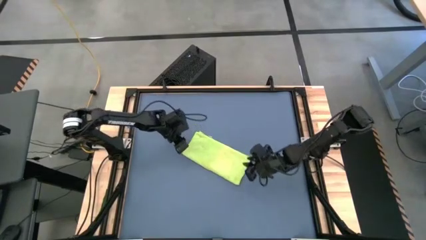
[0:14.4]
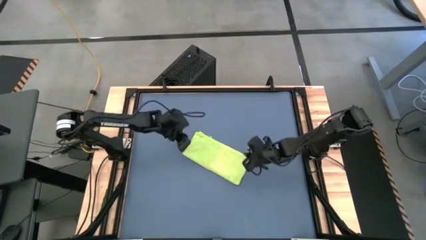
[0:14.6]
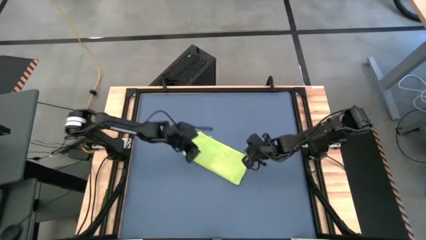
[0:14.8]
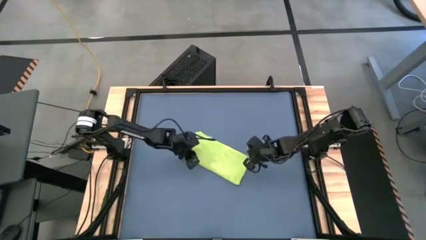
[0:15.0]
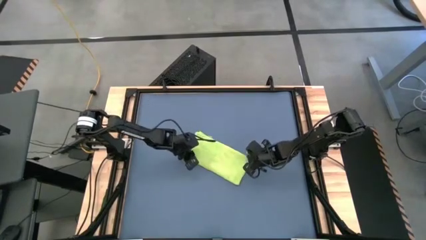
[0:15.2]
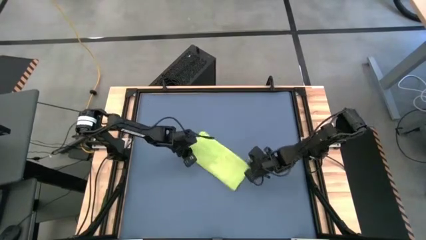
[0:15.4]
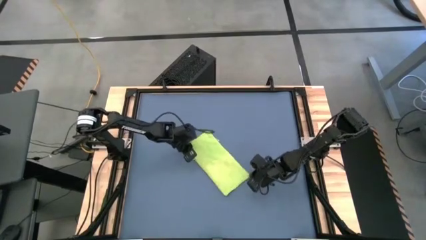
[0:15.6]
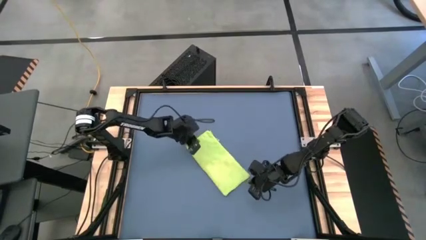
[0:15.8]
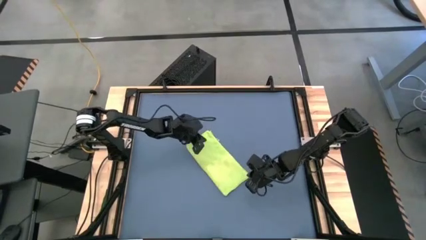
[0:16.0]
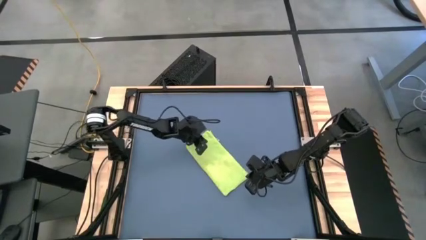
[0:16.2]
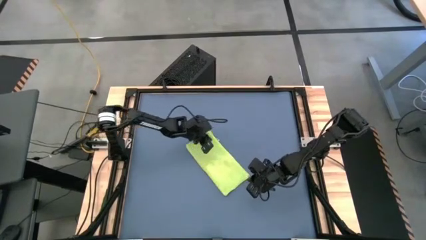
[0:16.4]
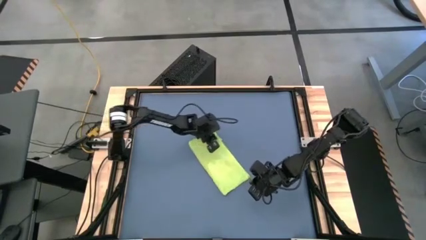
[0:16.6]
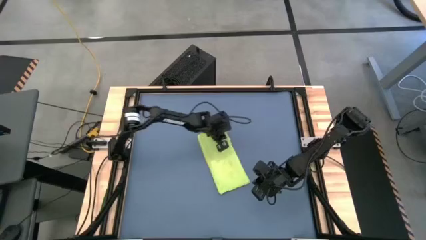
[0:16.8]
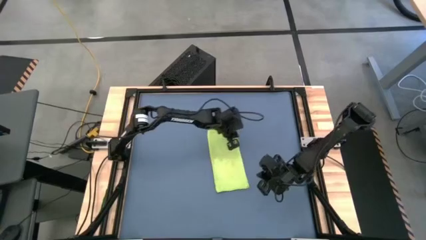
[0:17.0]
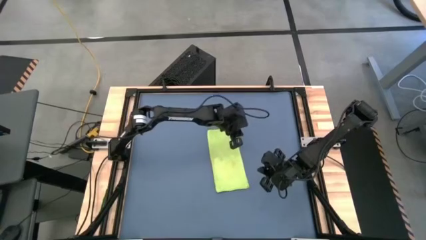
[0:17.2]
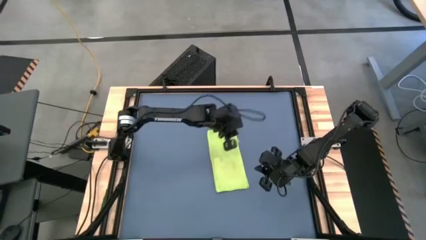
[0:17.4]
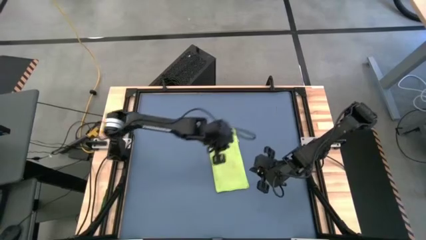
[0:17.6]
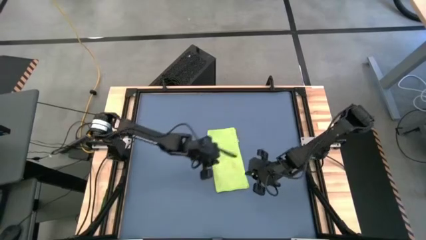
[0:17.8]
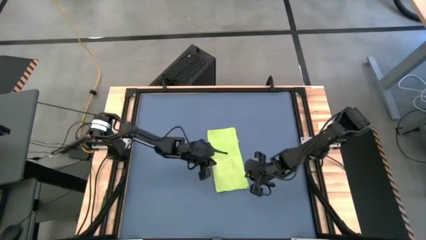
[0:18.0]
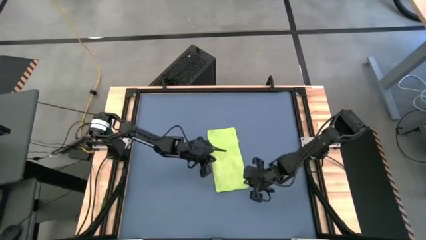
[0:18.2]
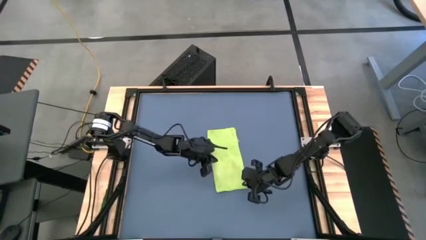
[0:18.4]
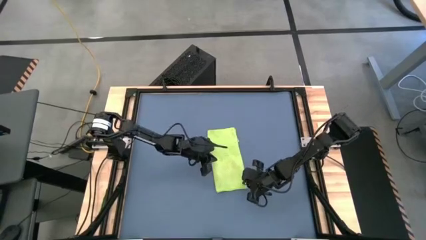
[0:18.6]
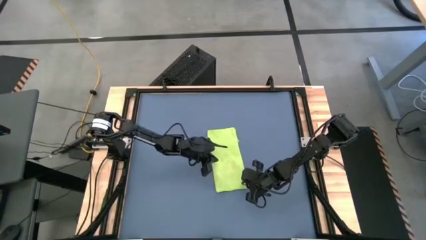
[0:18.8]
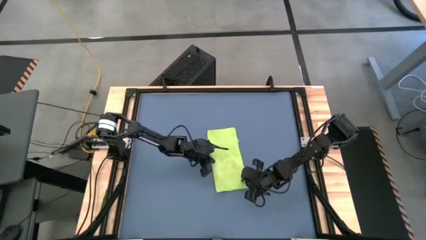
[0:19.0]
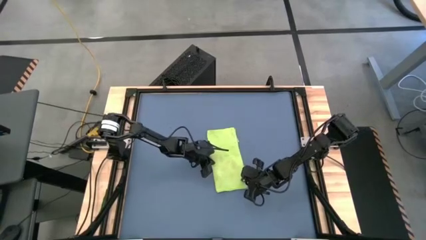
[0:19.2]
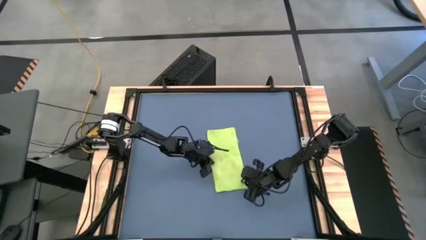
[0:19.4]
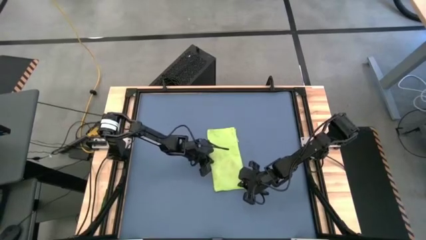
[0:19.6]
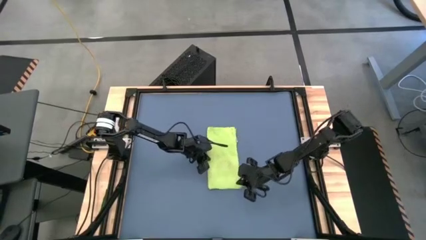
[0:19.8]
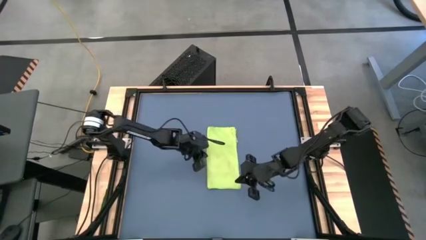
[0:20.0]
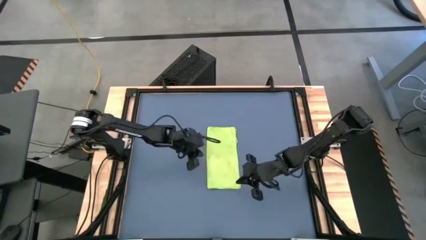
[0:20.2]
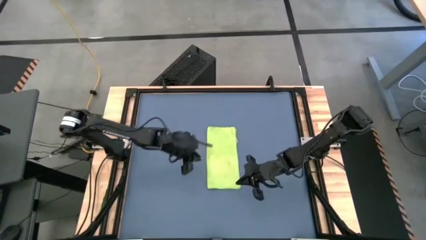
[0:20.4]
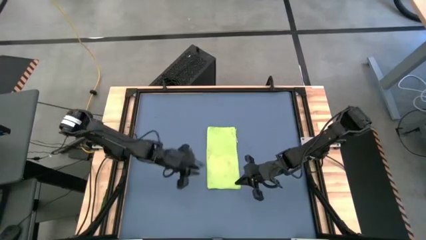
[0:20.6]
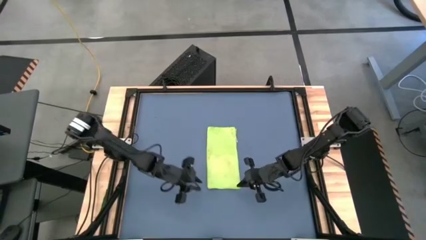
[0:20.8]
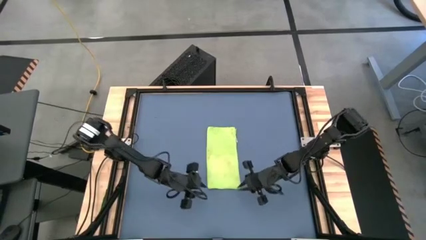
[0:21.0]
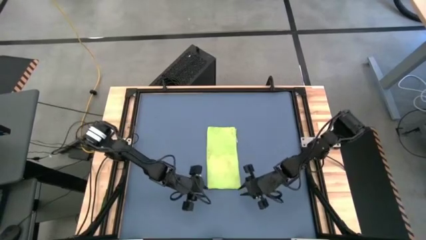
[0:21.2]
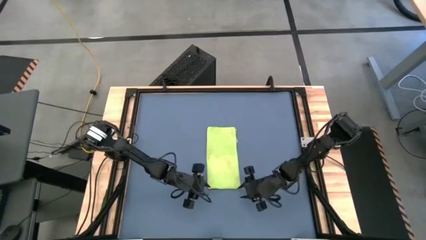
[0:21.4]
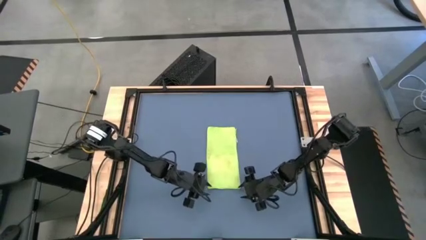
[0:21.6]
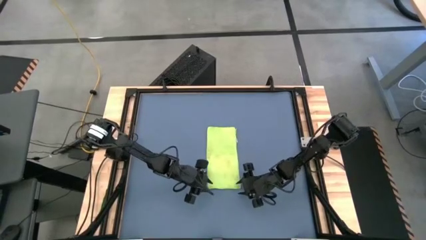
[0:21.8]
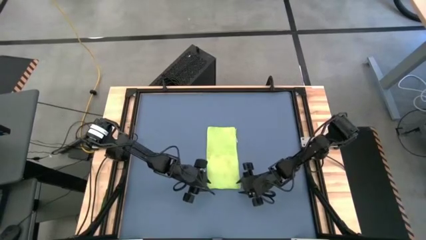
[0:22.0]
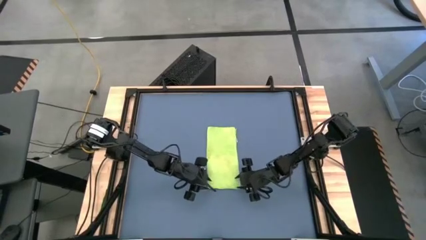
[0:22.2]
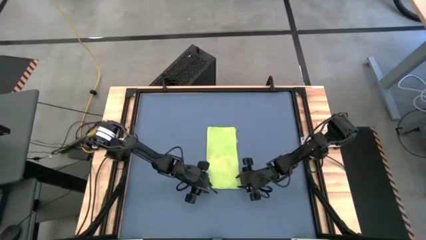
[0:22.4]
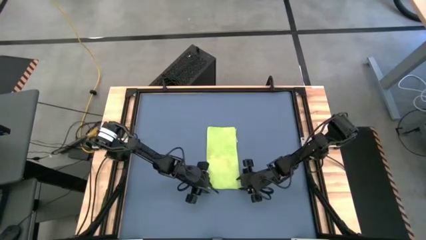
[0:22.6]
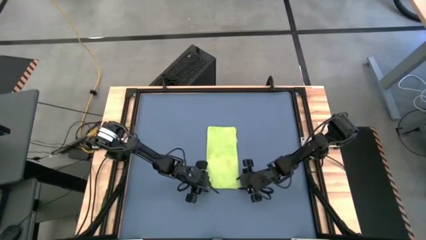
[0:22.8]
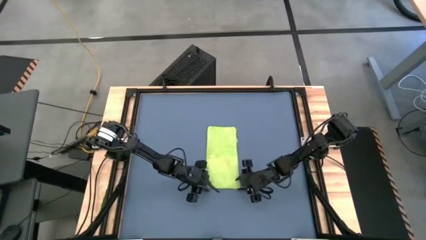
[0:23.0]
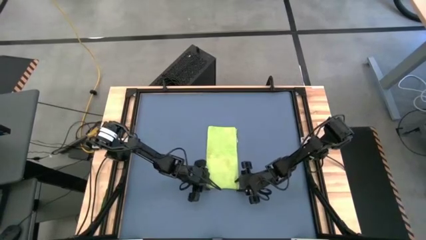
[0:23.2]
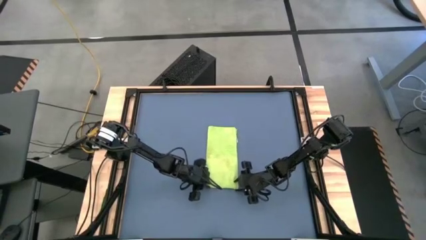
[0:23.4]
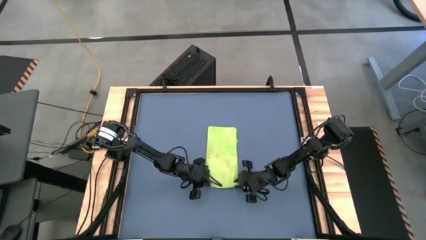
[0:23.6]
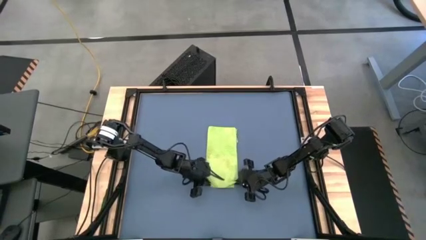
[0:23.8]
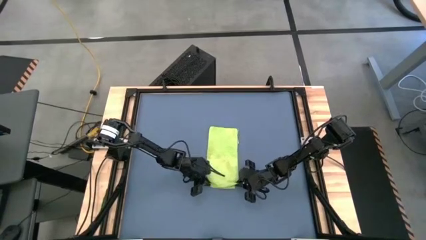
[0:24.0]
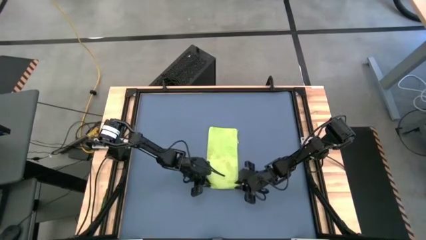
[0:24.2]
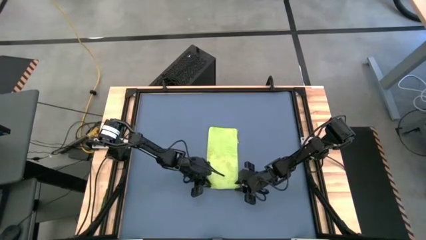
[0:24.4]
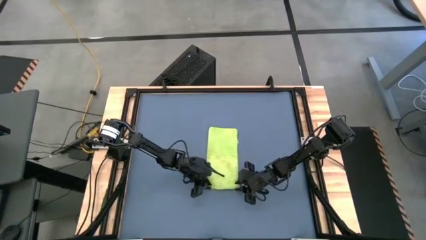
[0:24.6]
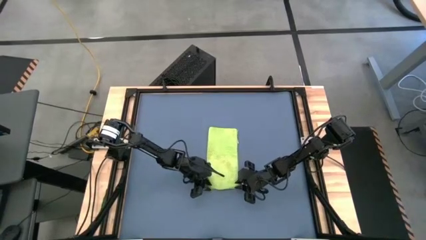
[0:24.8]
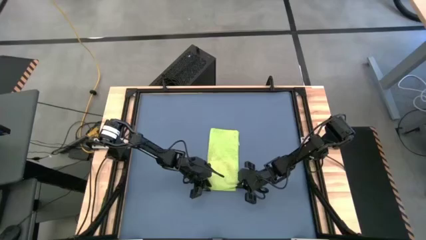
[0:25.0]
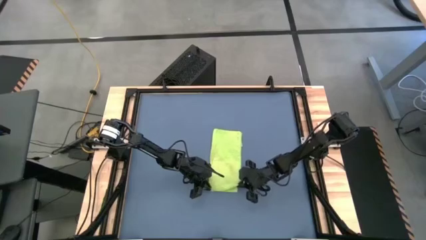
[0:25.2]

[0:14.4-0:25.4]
Task: Roll towel
Roll the green towel

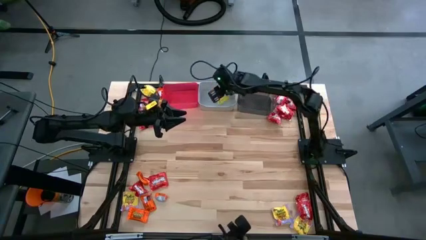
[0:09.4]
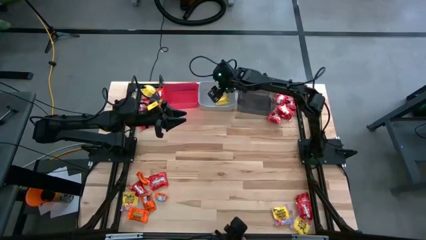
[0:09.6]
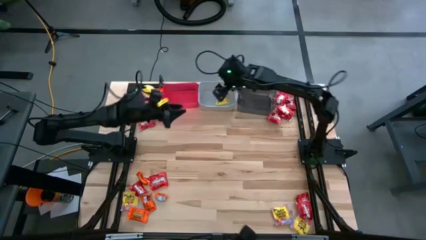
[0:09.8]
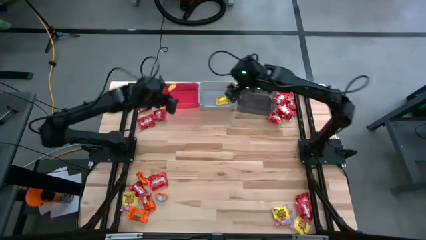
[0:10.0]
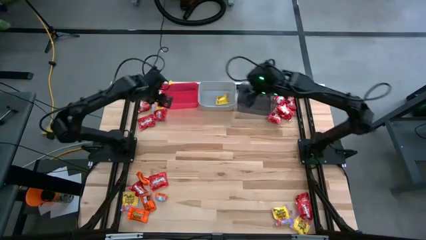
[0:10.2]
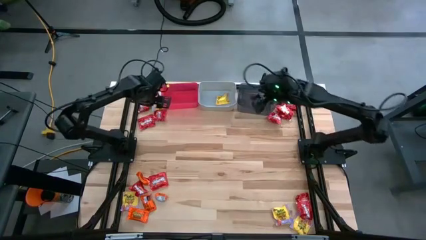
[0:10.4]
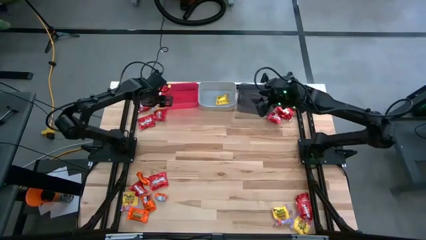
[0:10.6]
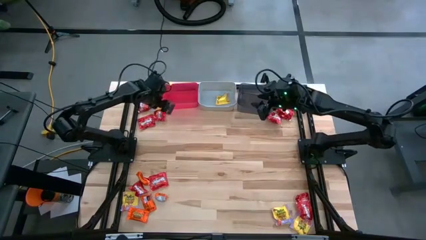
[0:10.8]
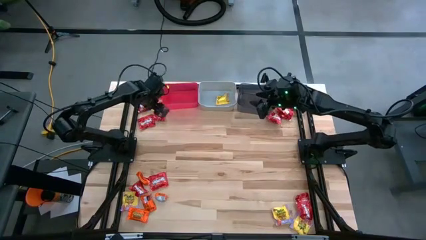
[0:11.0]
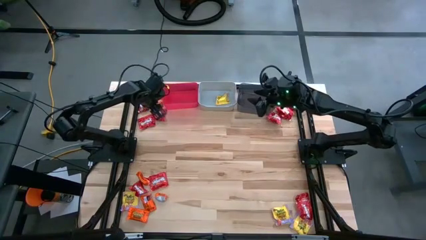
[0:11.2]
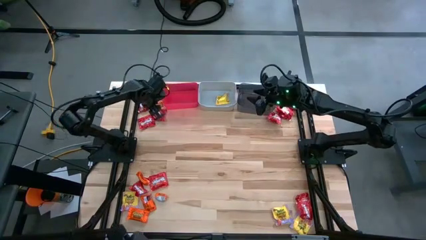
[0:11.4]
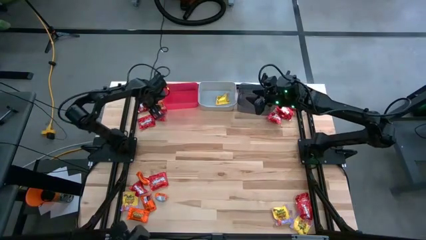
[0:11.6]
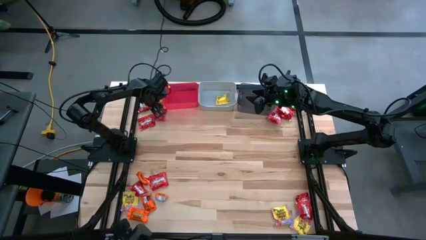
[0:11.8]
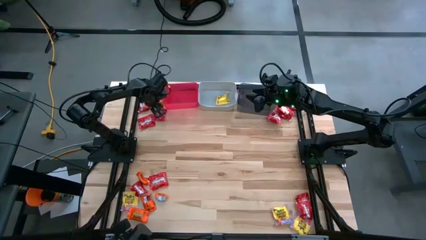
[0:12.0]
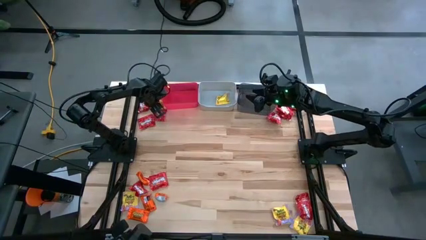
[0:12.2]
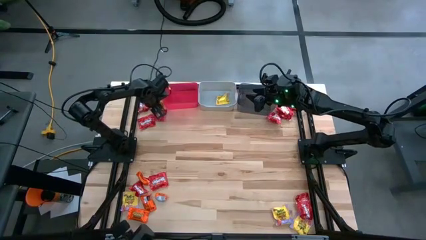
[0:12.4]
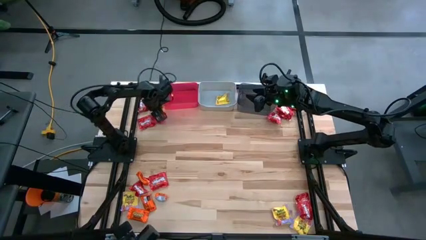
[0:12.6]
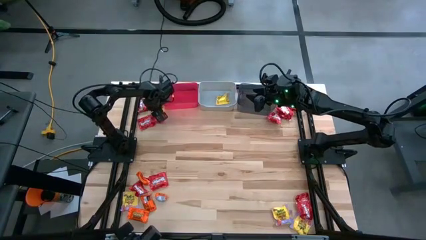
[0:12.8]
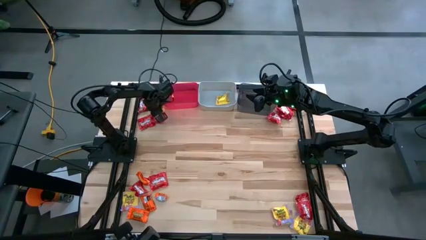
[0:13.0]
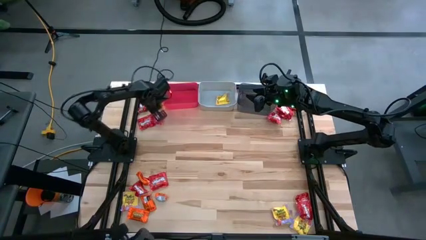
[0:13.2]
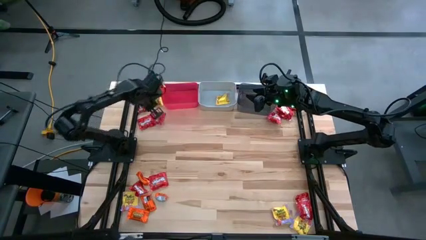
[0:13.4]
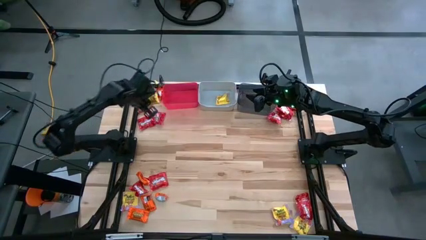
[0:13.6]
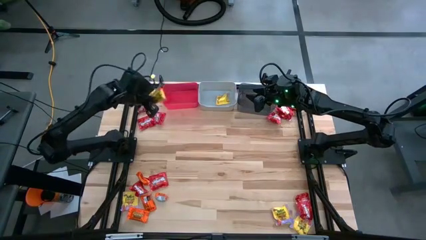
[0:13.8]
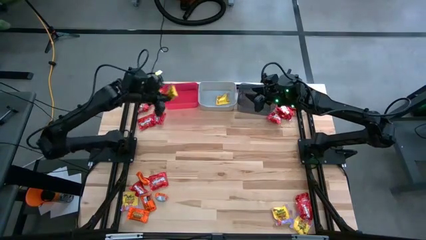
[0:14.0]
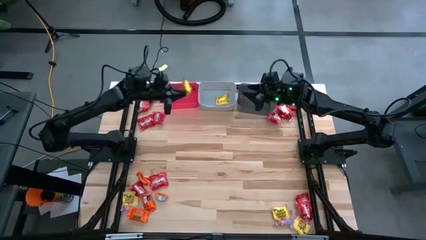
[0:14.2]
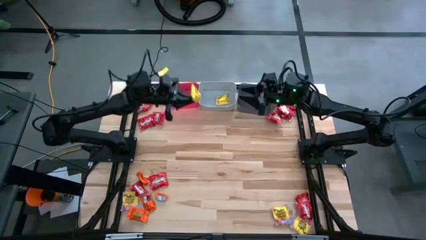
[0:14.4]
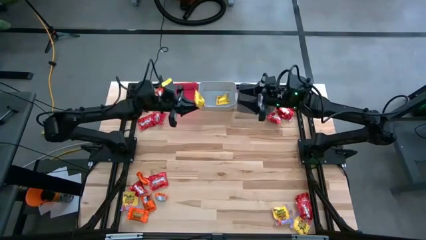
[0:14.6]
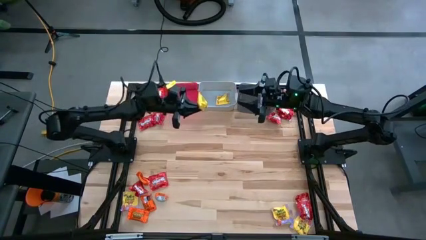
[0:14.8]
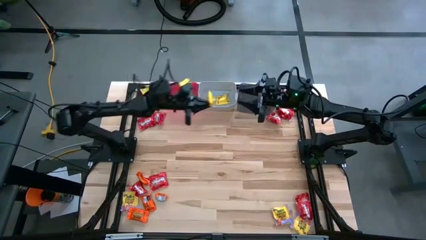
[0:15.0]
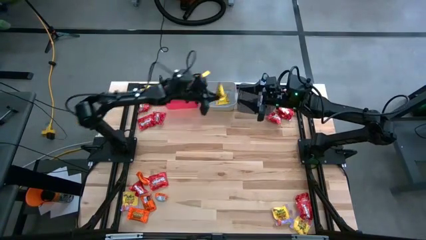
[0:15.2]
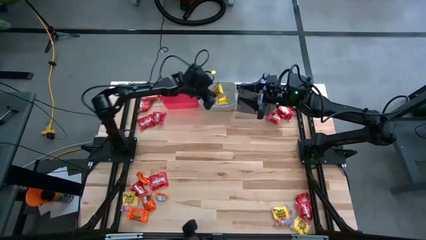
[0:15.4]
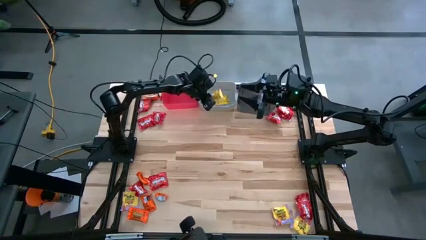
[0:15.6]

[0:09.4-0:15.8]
Task: Sort candy
Put the yellow candy into the gray bin
